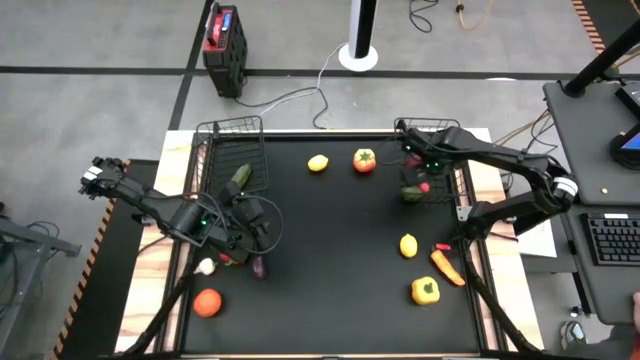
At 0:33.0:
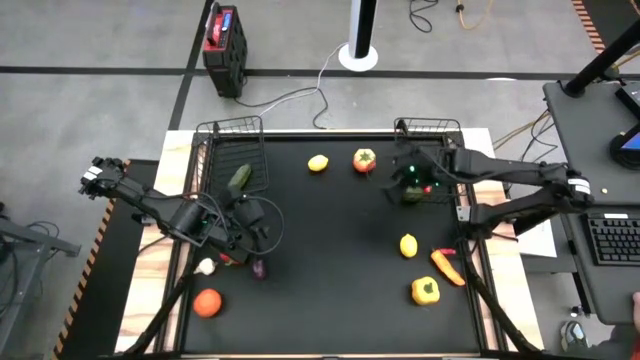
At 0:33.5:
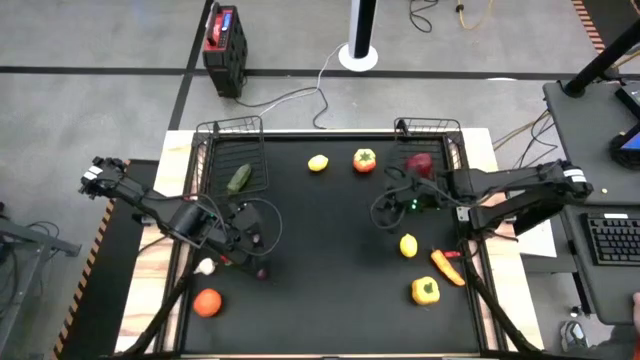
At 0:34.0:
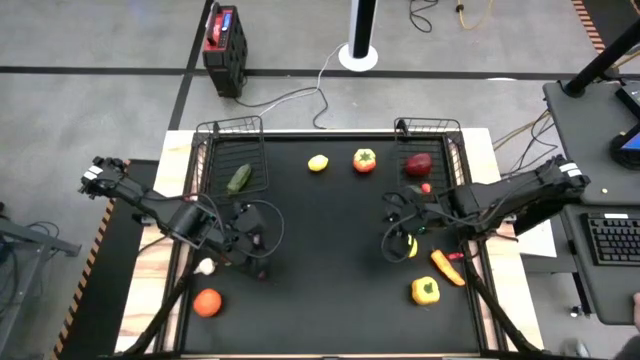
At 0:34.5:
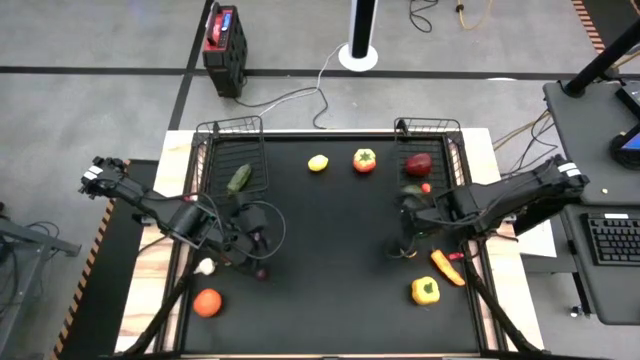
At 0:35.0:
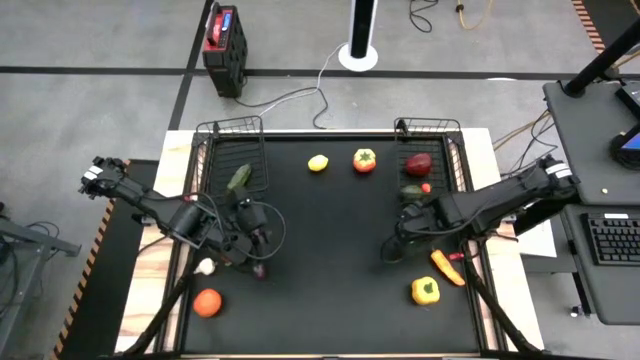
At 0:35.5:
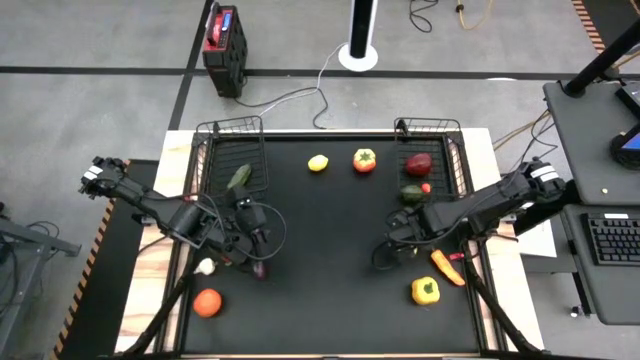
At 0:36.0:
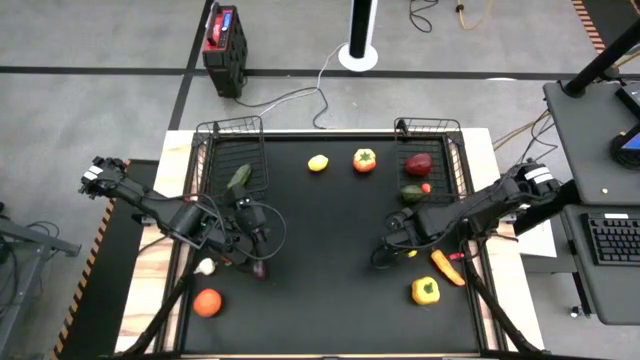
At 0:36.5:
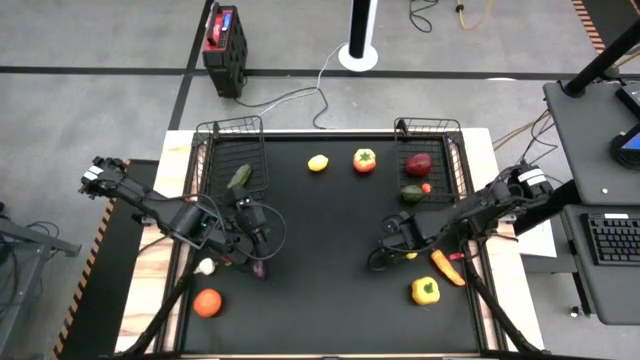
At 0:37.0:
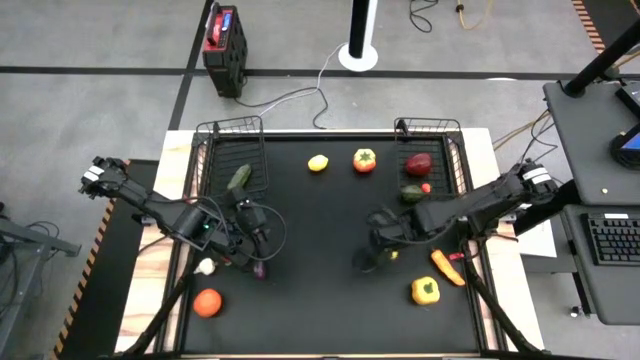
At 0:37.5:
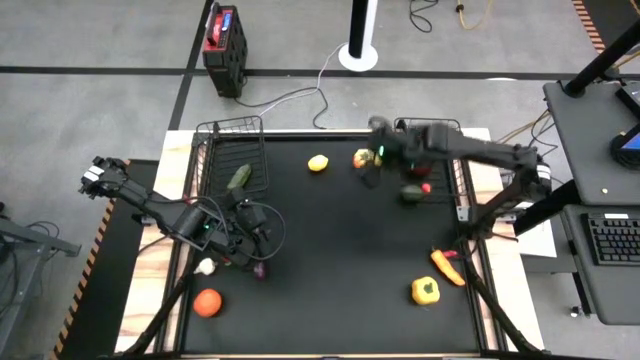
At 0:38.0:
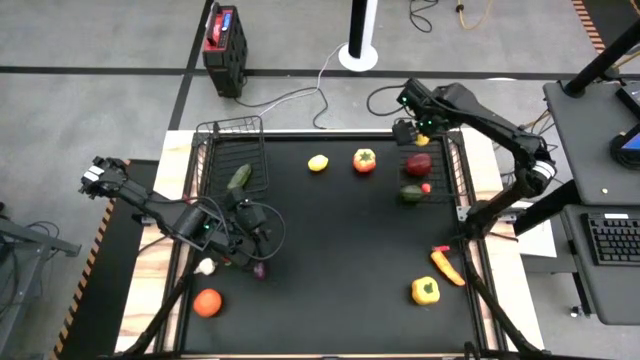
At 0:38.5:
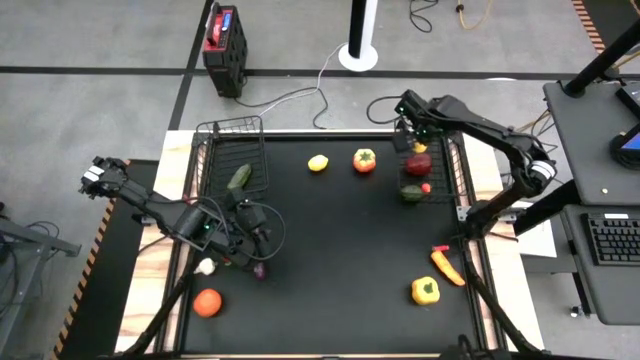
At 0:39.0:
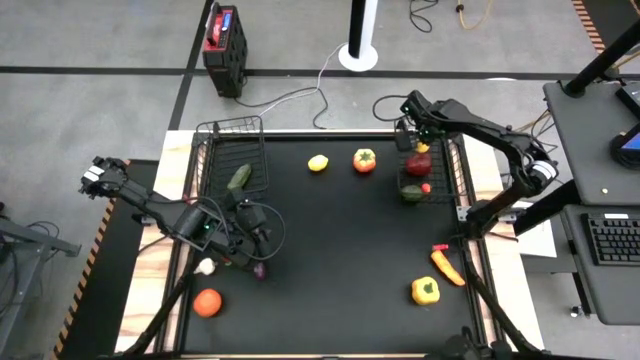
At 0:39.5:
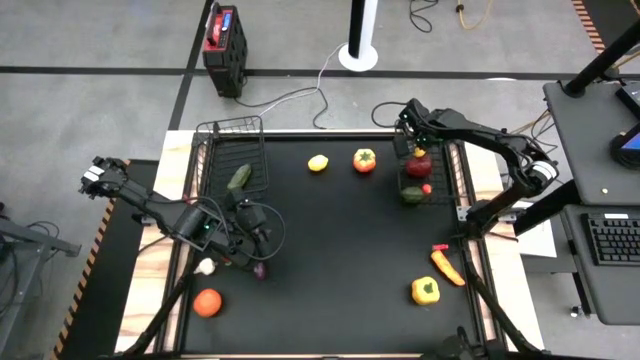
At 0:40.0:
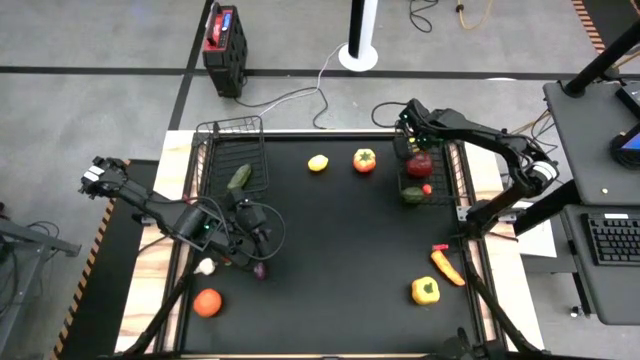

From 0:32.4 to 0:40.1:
Task: Sort produce into baskets
Put the yellow lemon into the right wire basket

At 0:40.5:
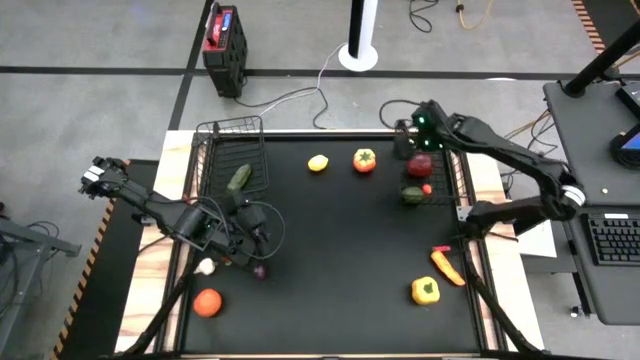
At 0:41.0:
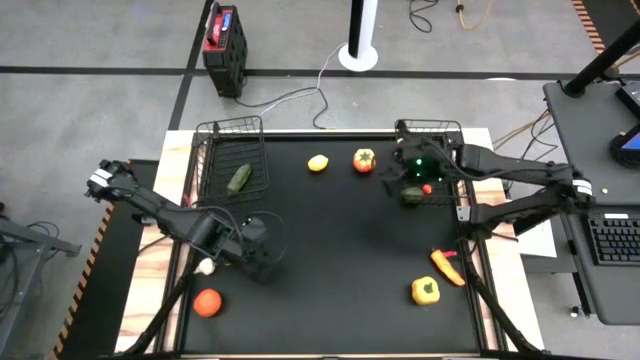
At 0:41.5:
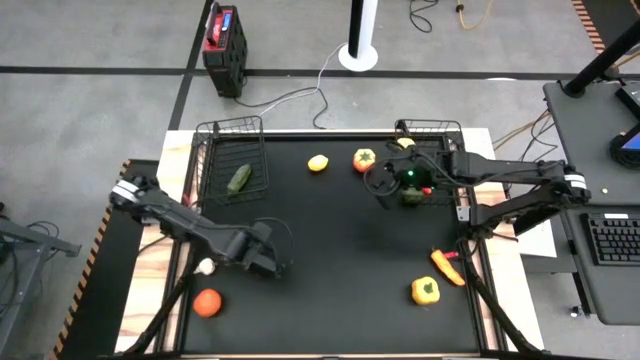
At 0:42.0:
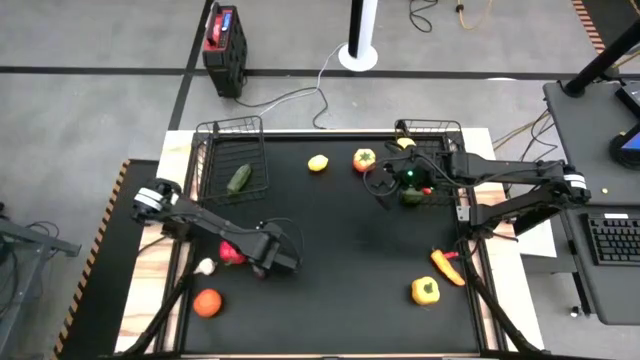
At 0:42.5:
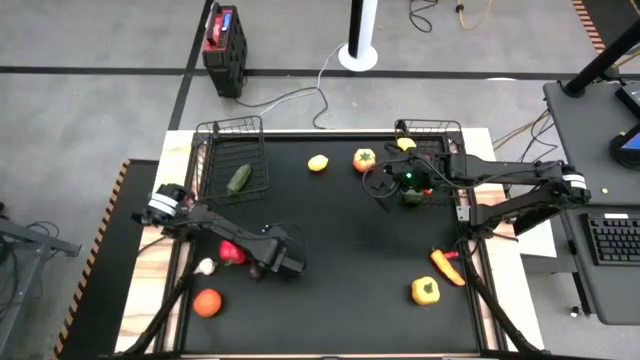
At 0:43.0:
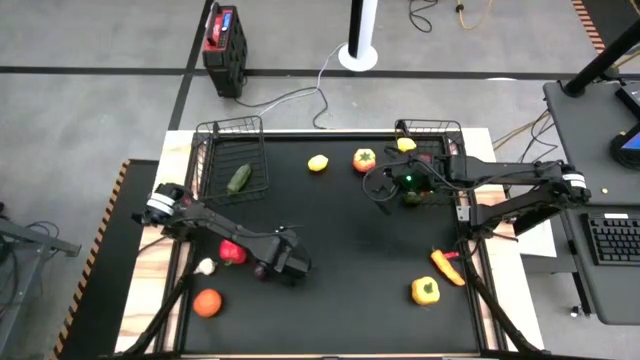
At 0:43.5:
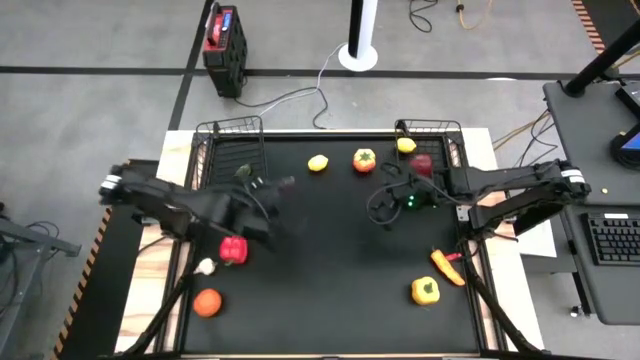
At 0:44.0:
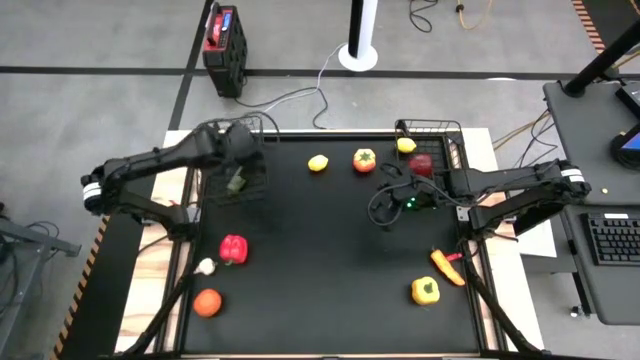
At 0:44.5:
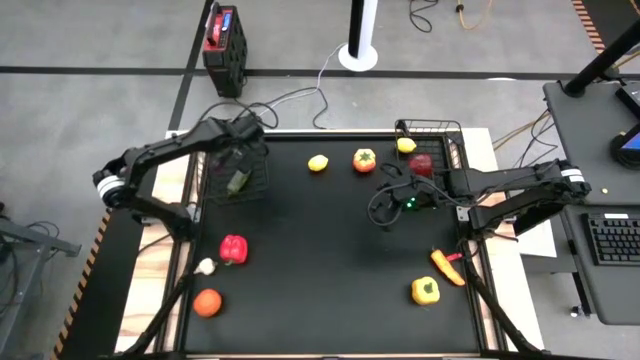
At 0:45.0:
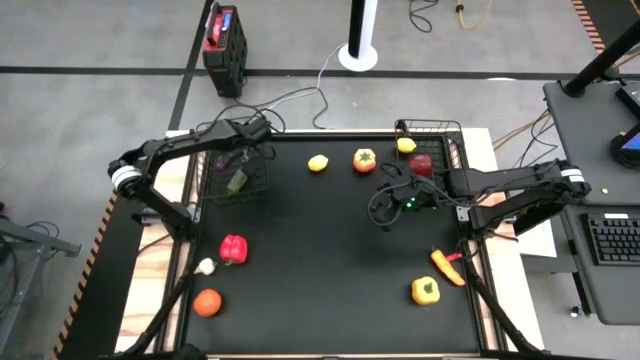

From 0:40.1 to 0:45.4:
Put the eggplant into the left wire basket

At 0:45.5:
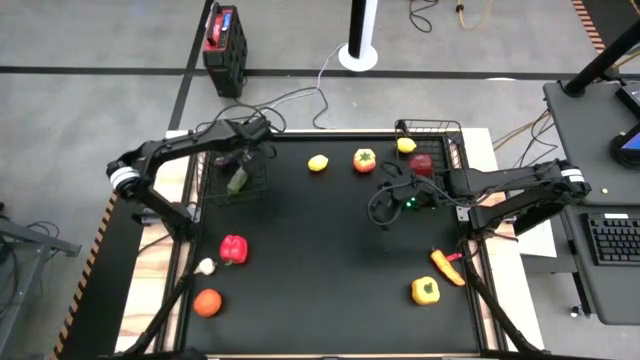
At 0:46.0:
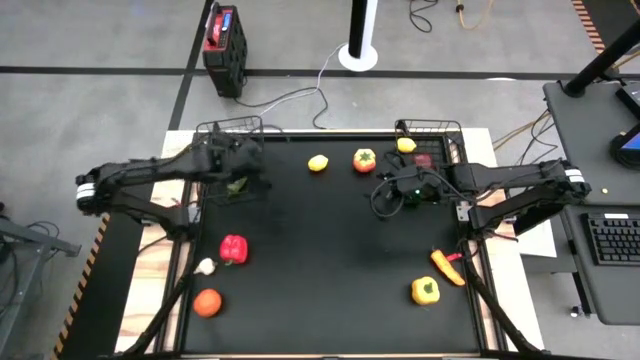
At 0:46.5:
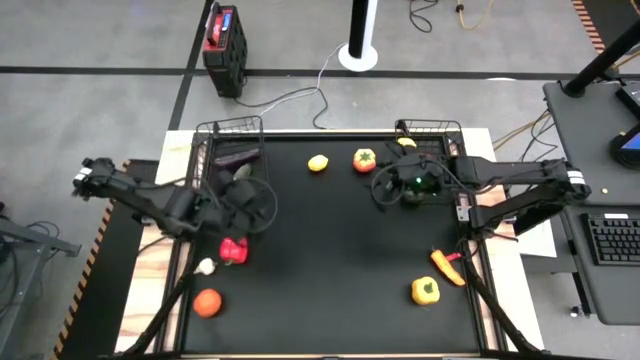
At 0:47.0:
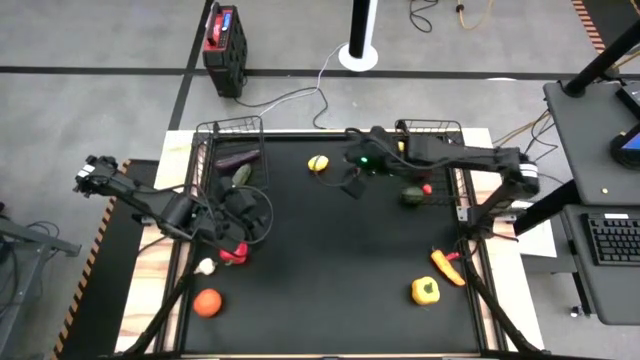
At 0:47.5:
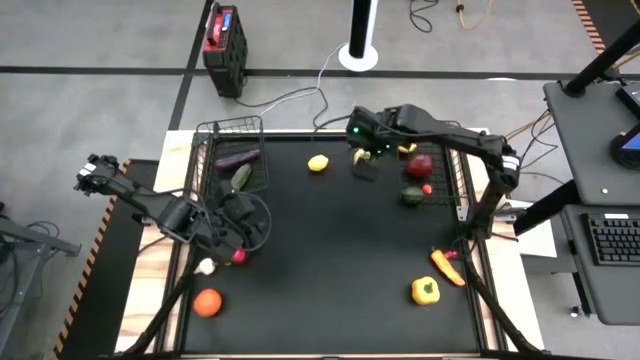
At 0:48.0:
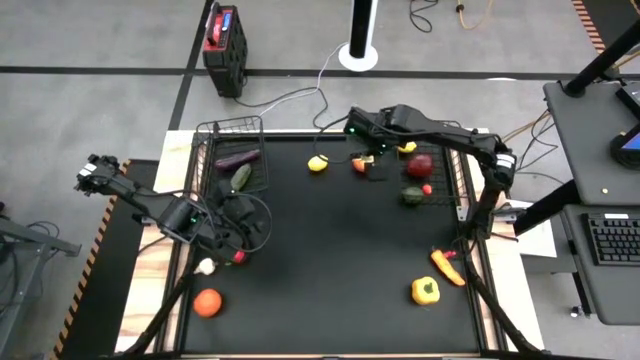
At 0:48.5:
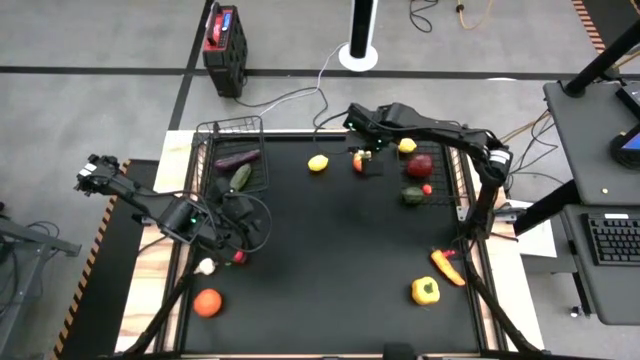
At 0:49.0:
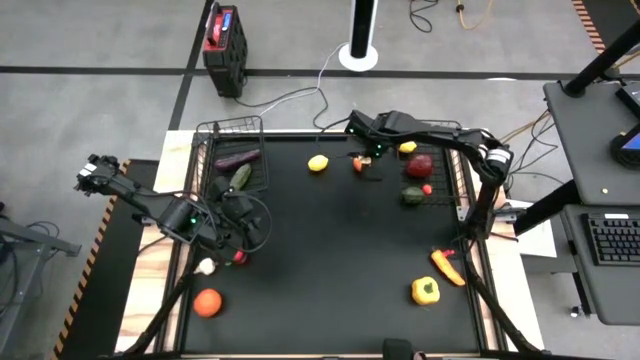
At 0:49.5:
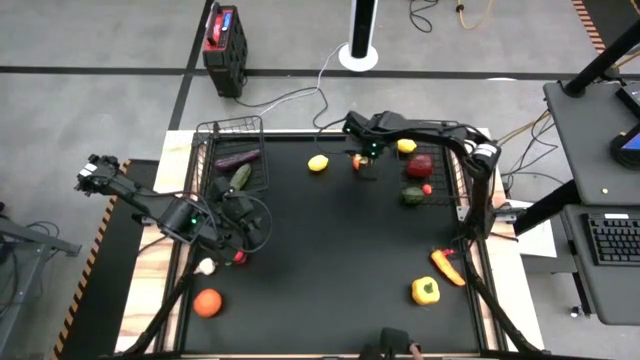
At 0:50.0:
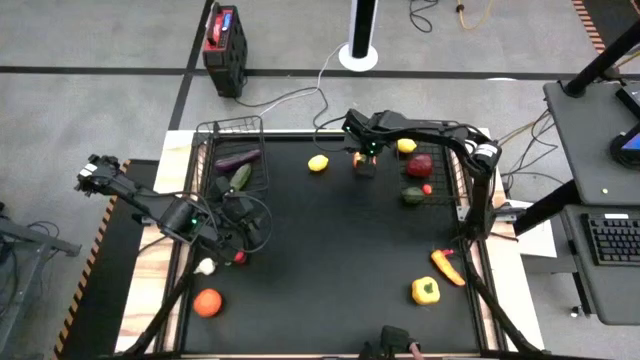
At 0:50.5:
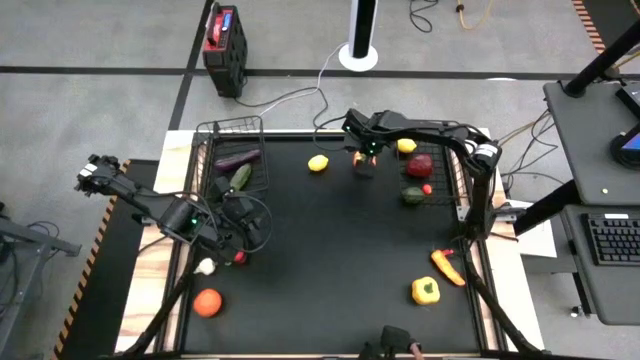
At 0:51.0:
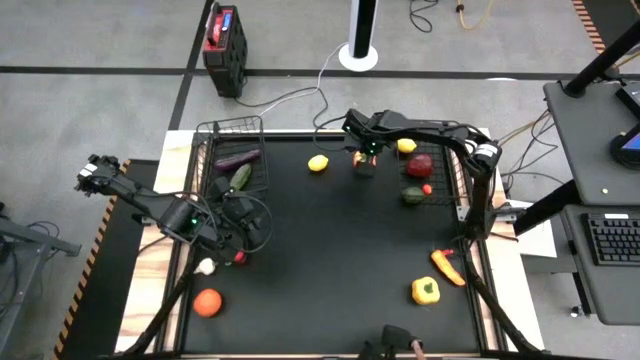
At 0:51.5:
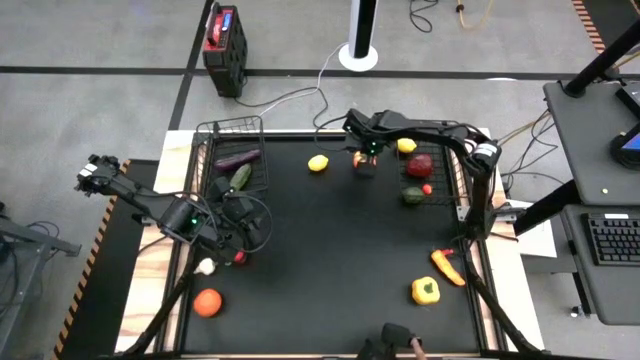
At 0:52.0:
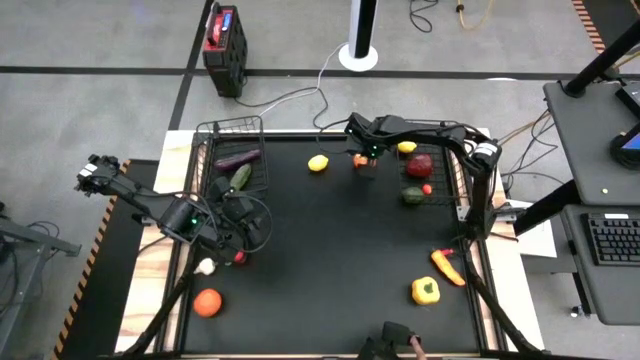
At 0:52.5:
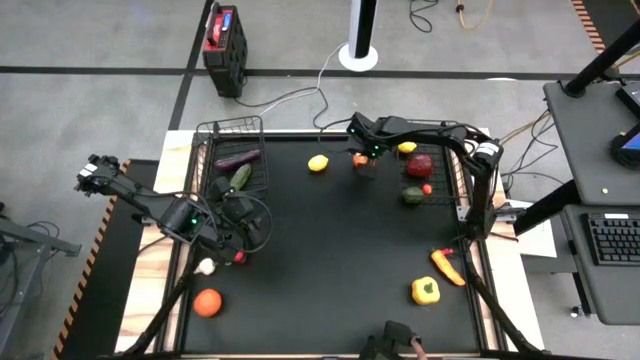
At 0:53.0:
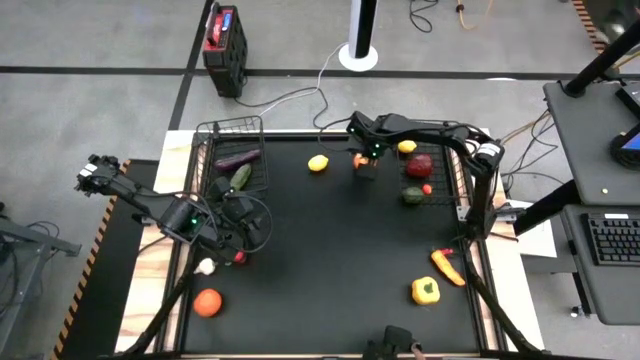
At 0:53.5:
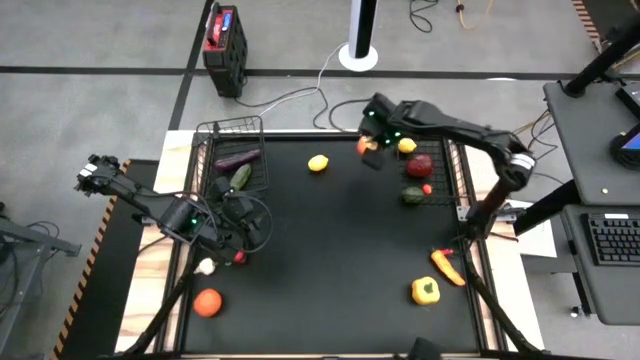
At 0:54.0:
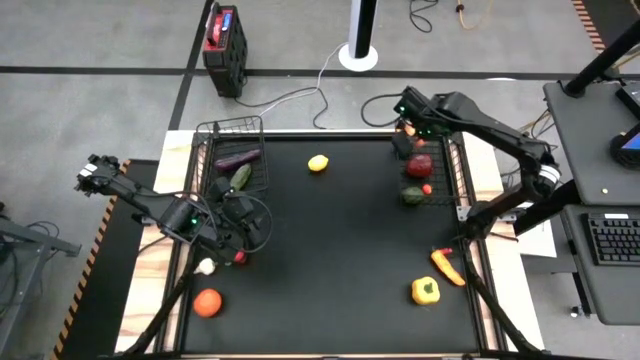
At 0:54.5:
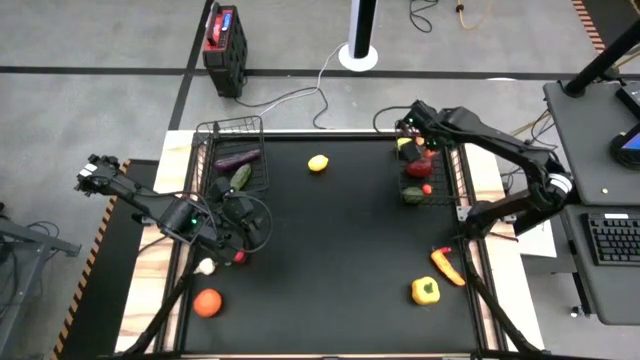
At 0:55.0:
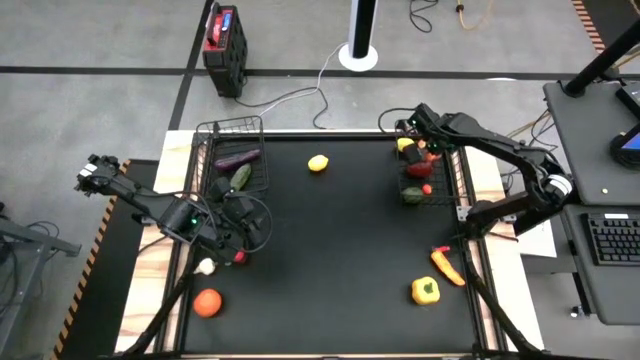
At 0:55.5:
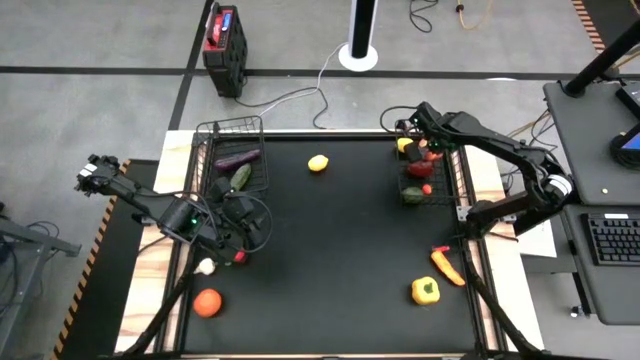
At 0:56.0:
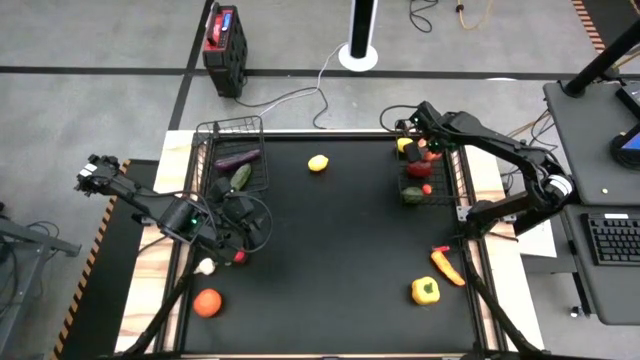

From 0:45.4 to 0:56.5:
Put the red tomato into the right wire basket
